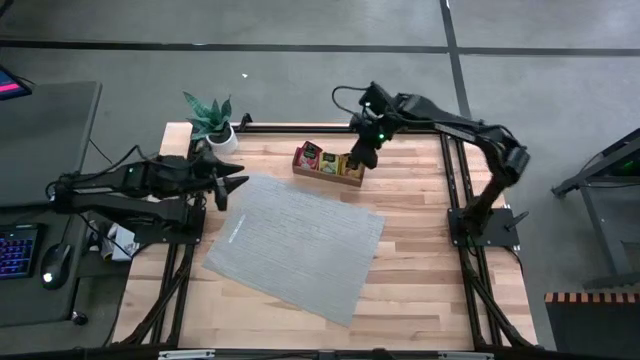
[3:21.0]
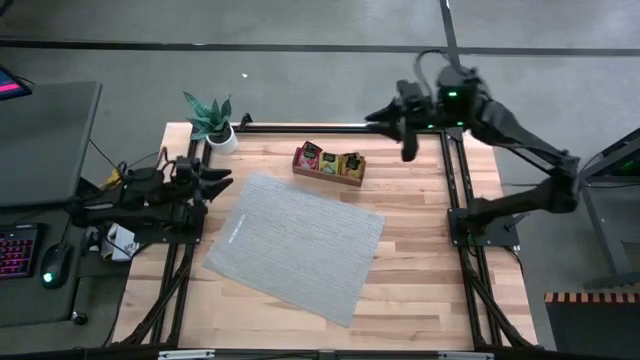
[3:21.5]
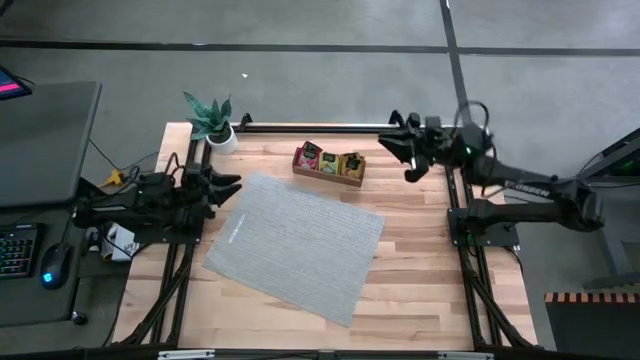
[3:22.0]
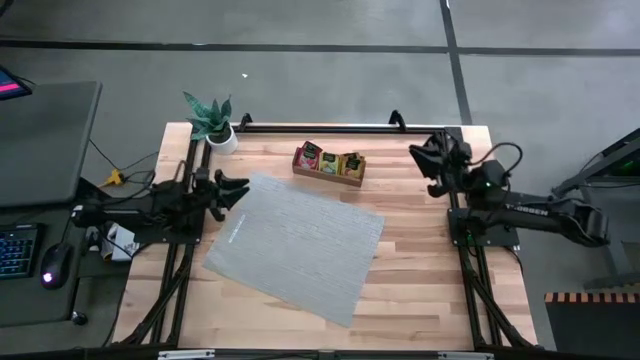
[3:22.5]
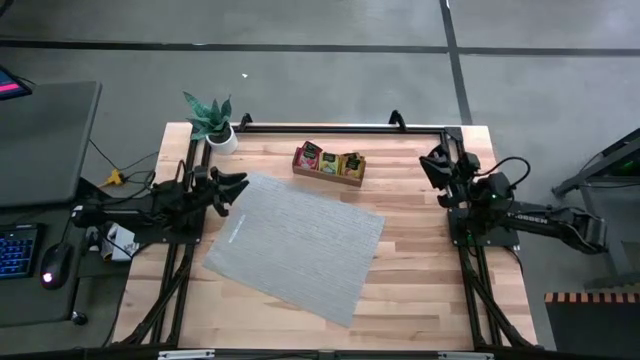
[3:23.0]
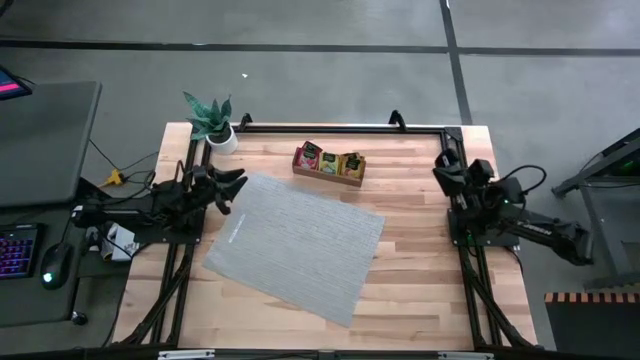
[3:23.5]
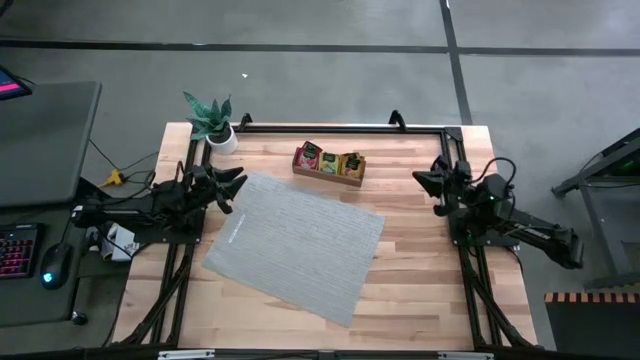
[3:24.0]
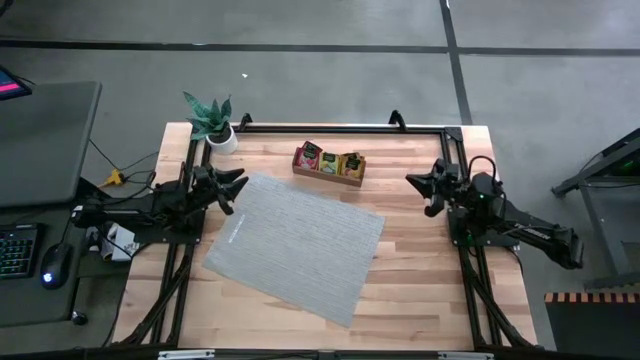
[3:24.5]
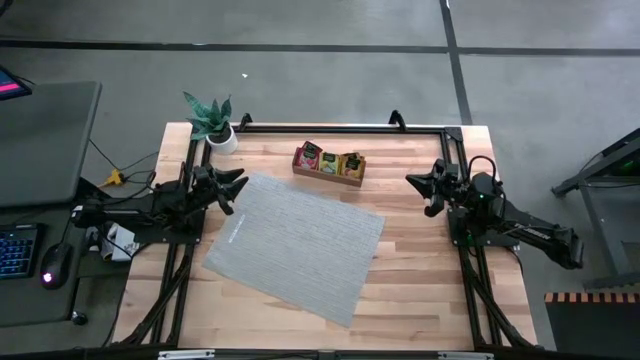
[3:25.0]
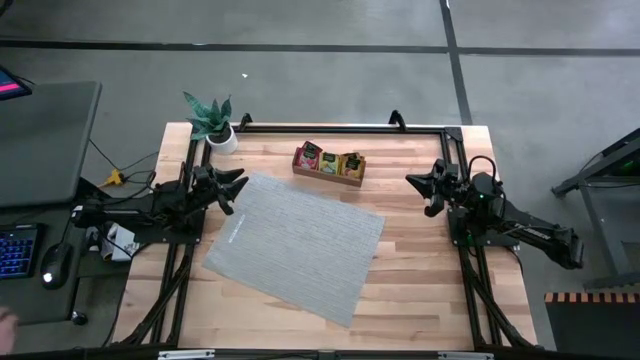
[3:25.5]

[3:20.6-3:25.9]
Task: Pick & Place Tea
Return to Home Position

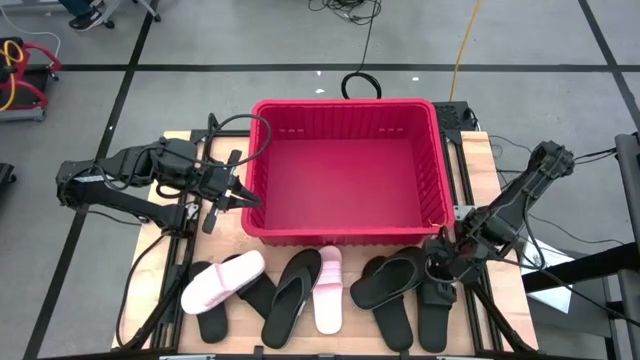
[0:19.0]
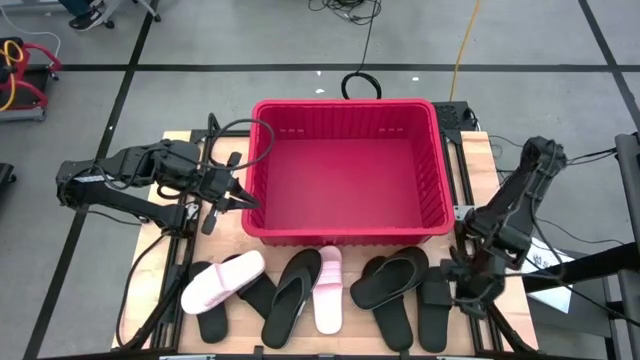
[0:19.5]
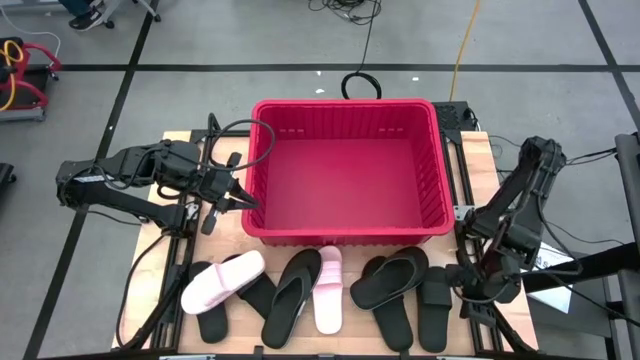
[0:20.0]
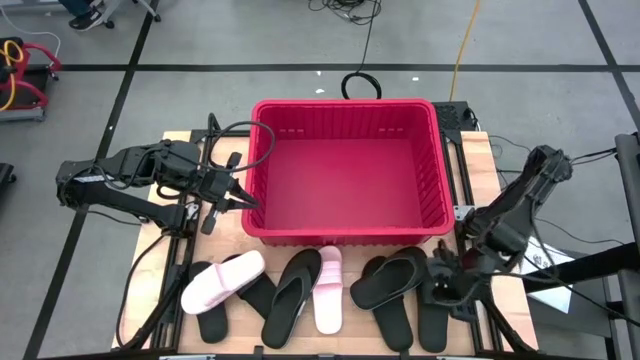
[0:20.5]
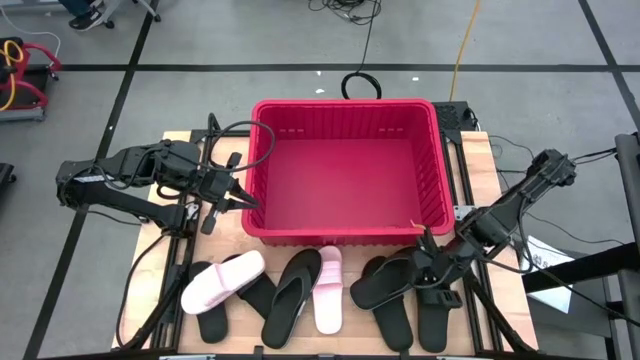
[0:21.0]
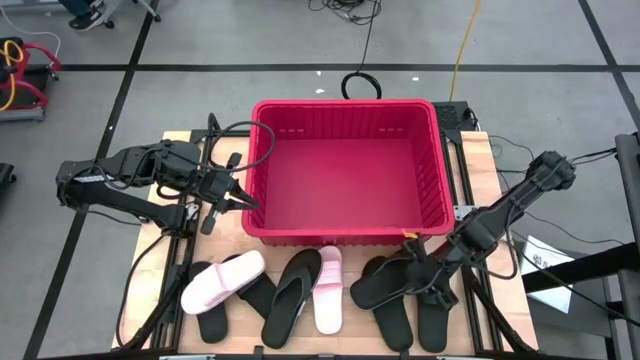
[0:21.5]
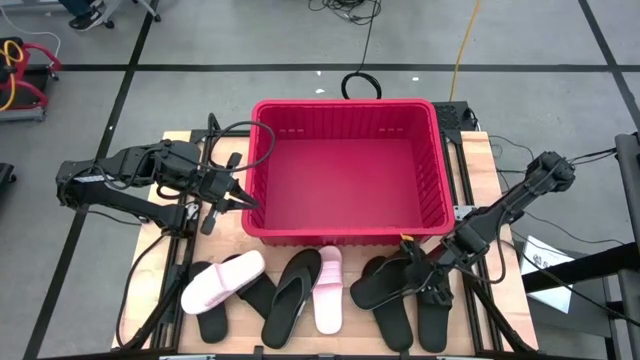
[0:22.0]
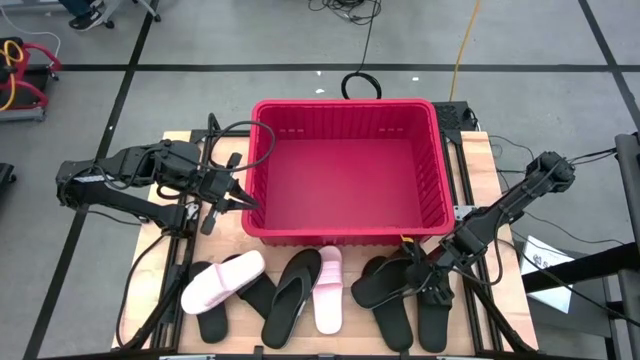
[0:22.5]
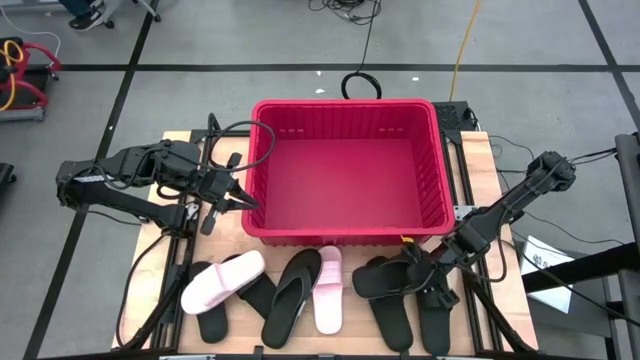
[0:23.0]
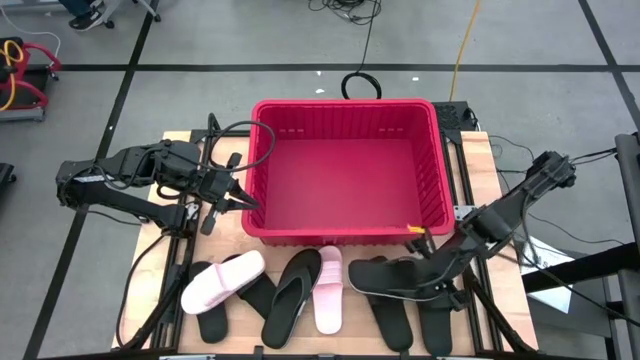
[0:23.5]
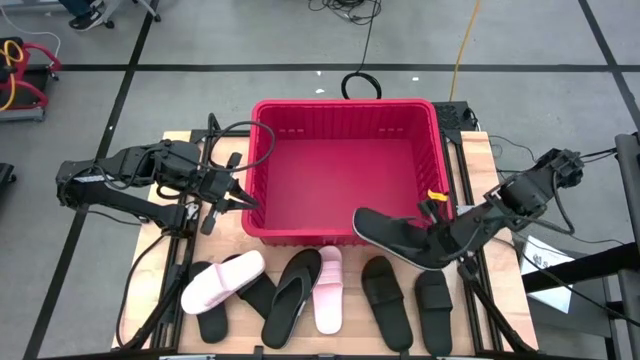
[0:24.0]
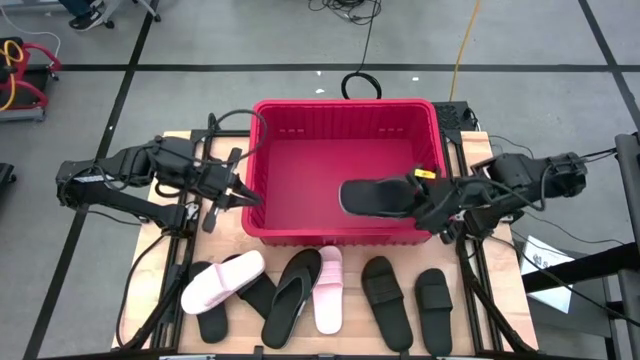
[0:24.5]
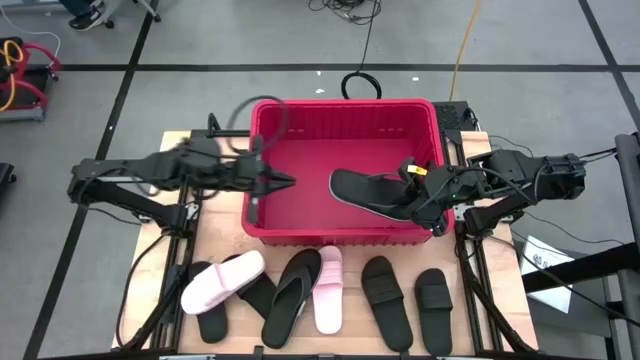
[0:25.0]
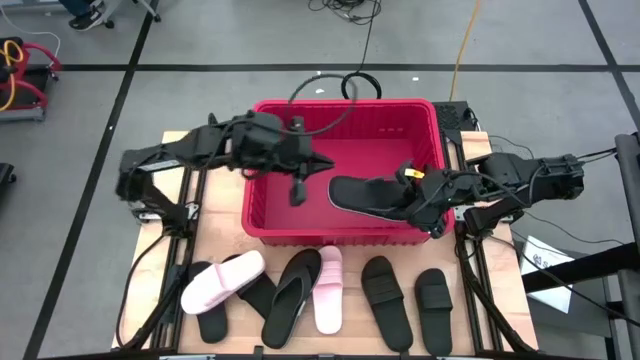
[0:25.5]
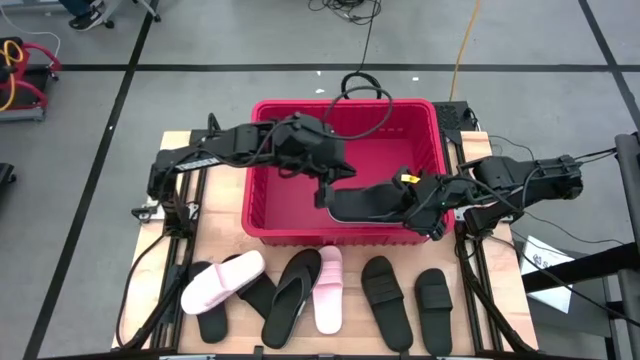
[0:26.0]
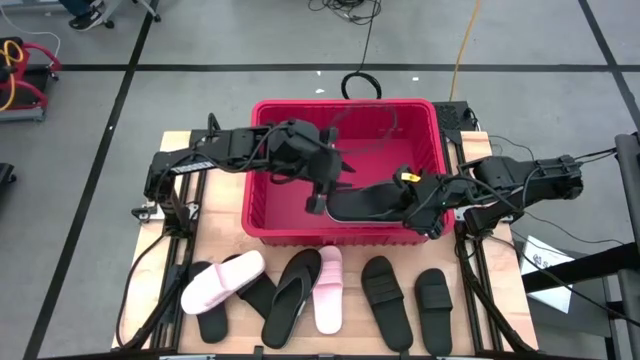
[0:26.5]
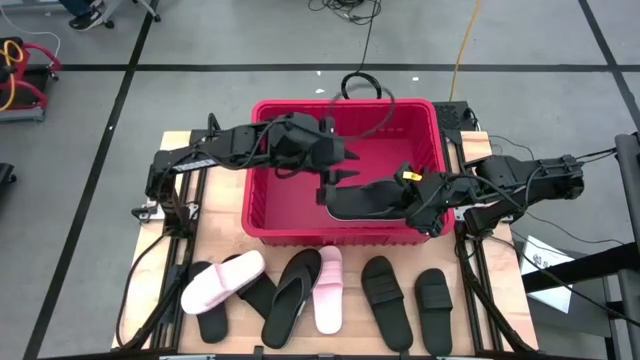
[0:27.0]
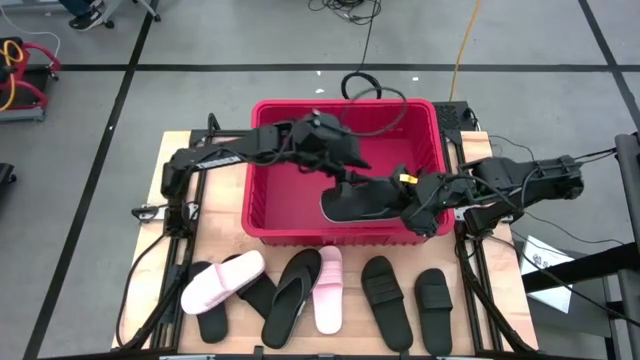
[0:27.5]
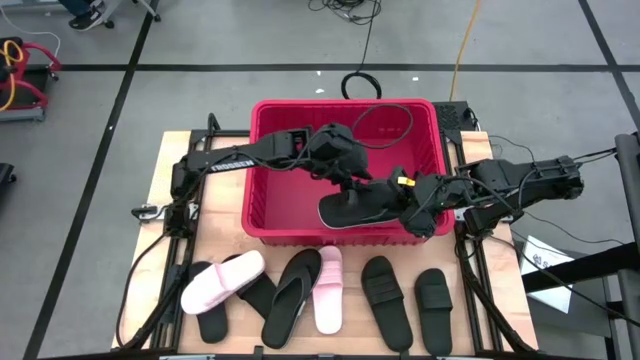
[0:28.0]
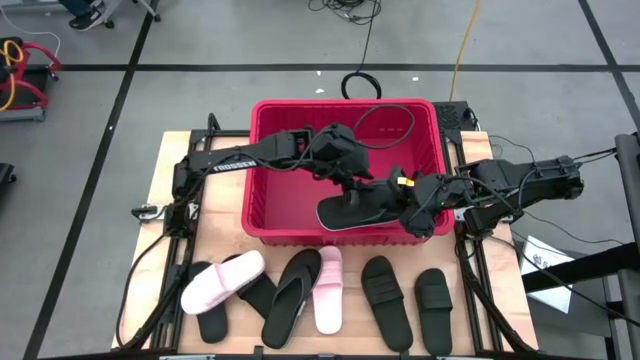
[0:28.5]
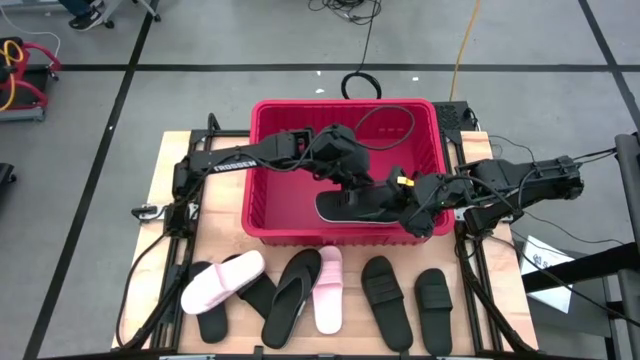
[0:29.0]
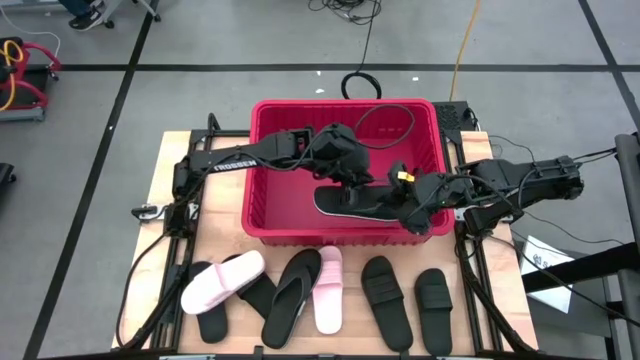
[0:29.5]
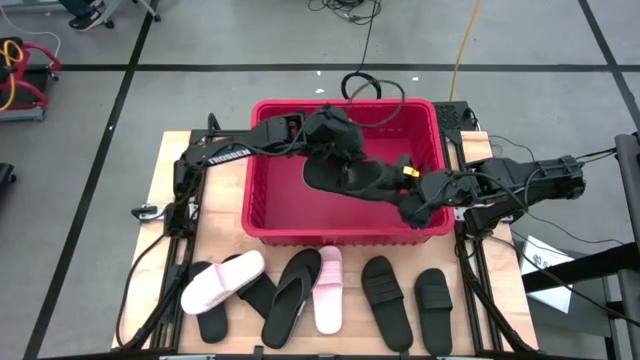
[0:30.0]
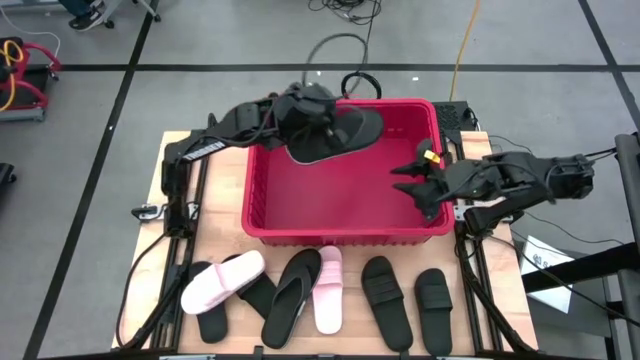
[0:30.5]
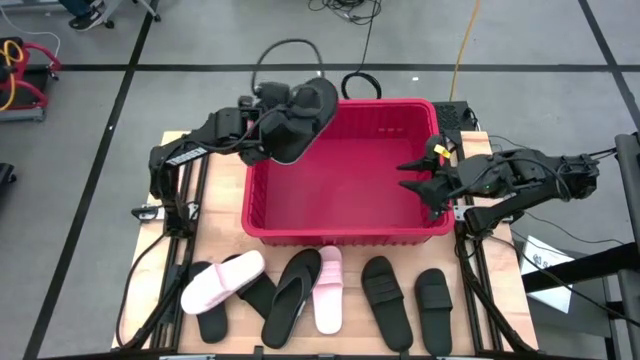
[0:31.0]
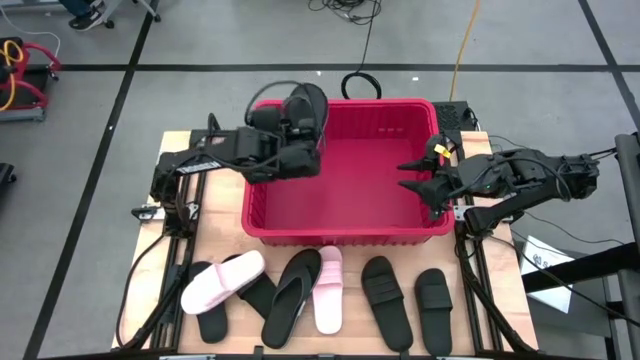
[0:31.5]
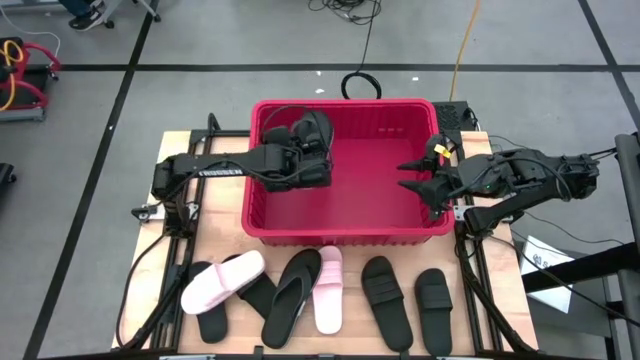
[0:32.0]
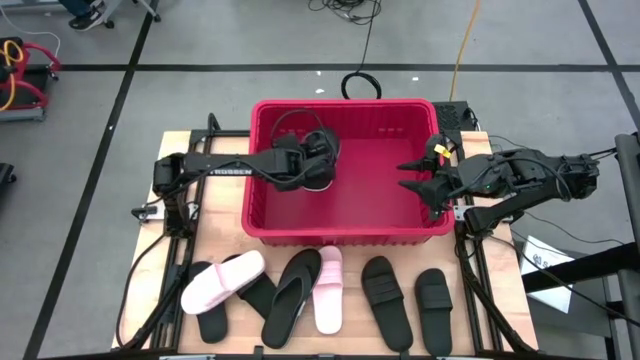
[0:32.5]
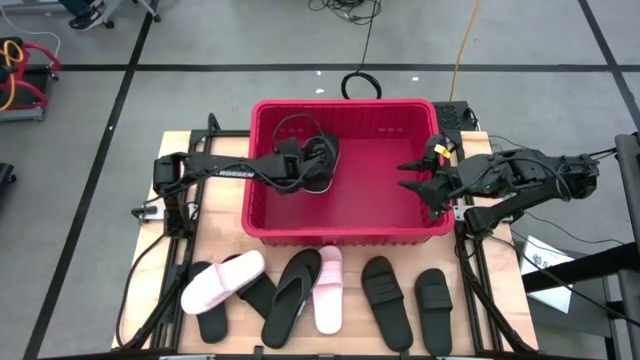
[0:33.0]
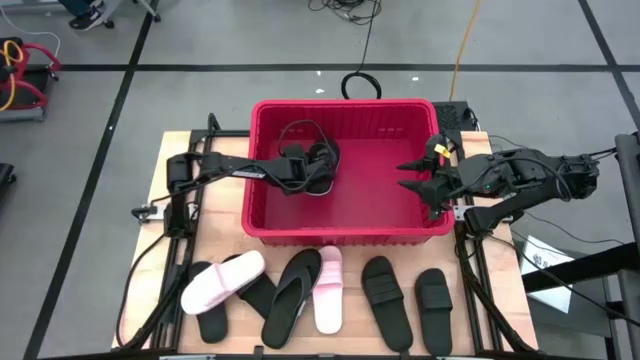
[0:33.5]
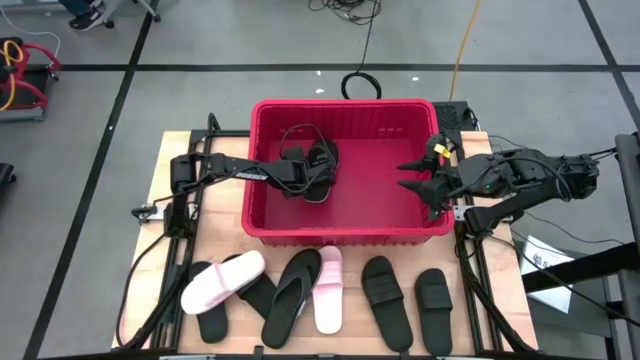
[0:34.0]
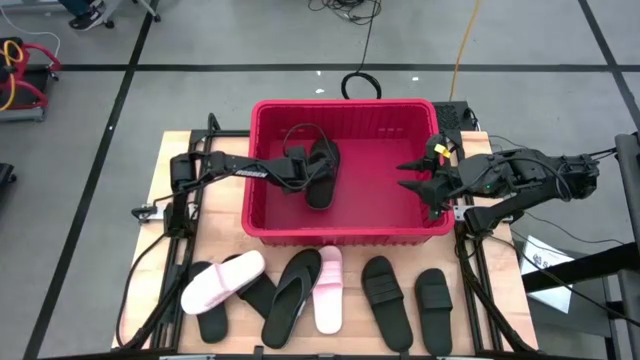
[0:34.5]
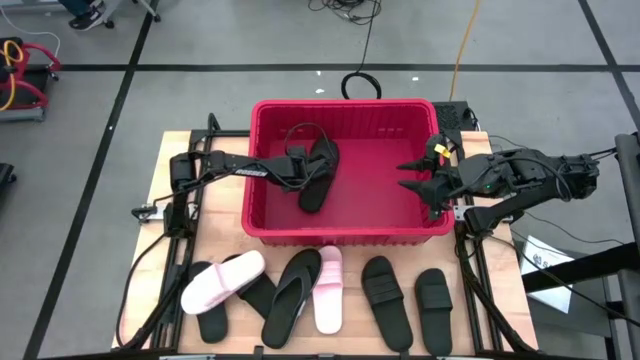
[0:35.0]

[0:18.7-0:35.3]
Task: Pick and place slides into bin
Put the right black slipper into the red bin
